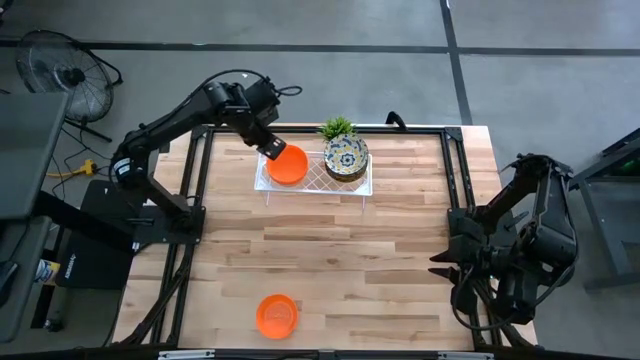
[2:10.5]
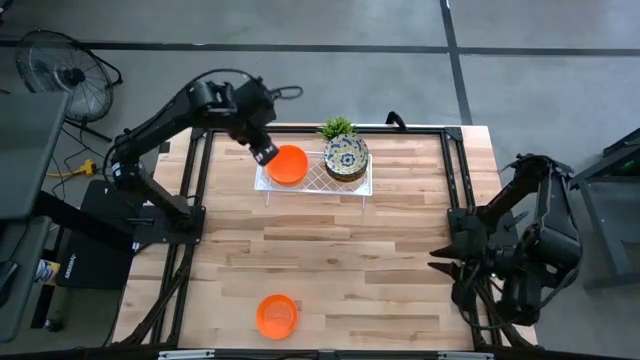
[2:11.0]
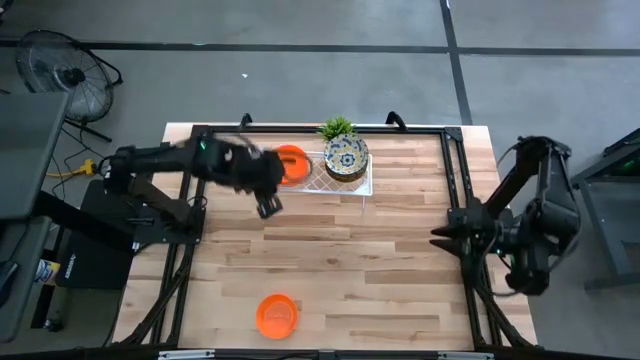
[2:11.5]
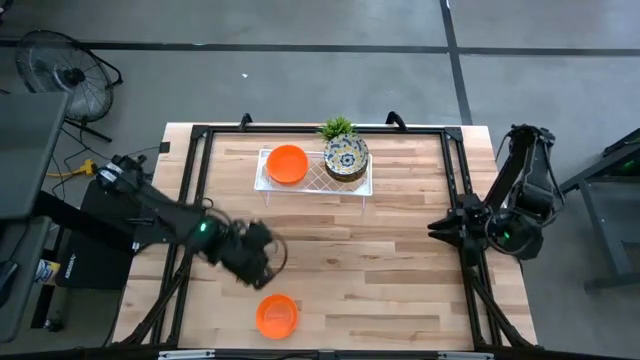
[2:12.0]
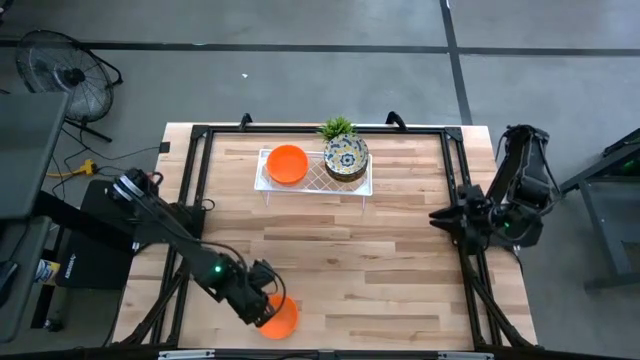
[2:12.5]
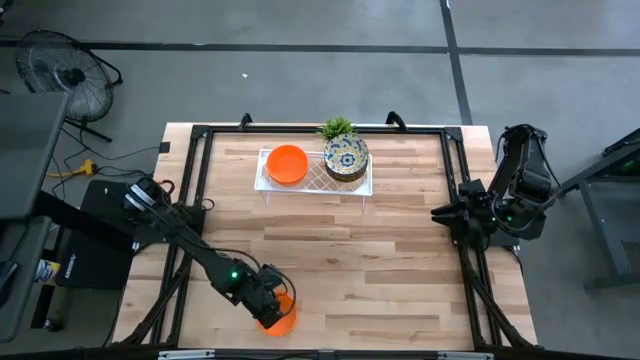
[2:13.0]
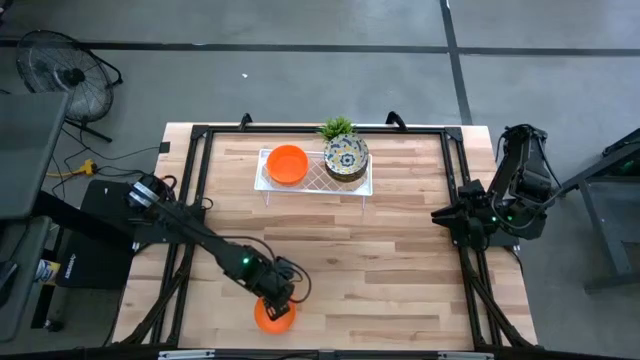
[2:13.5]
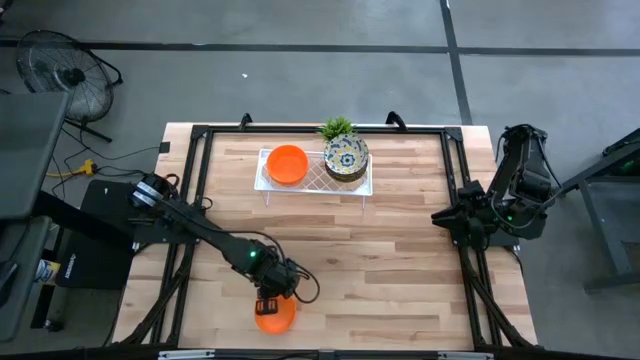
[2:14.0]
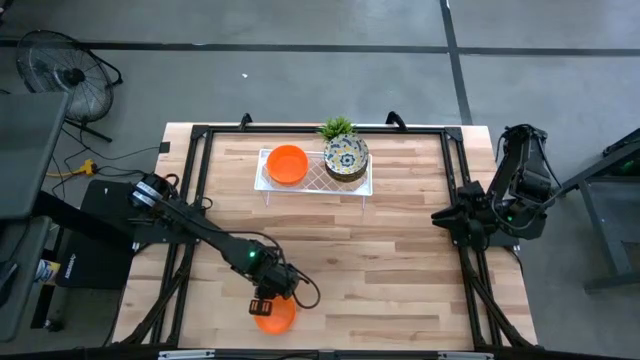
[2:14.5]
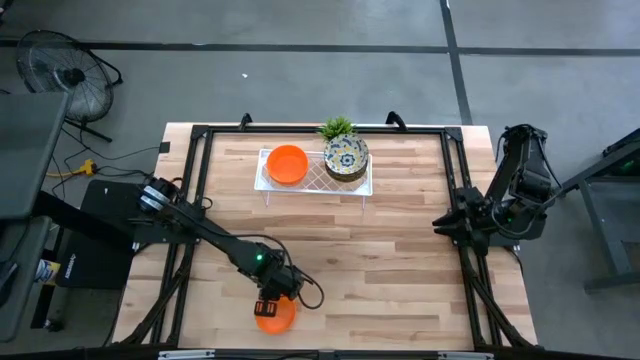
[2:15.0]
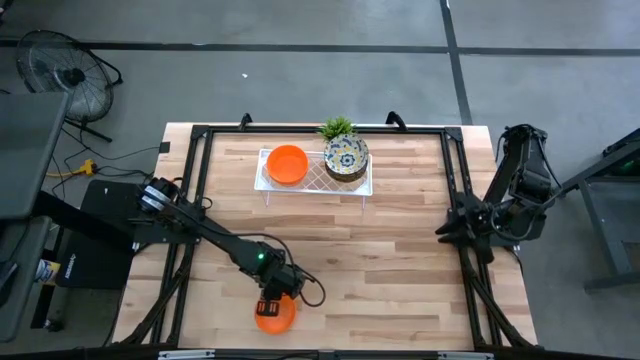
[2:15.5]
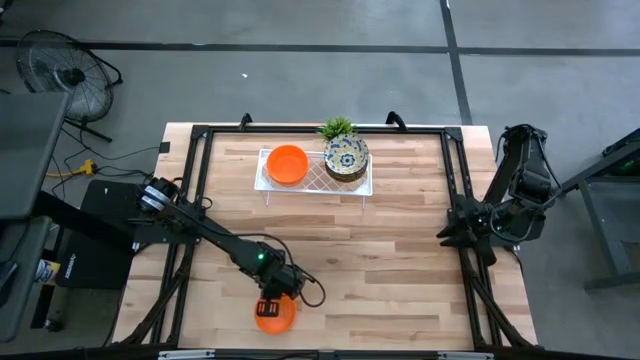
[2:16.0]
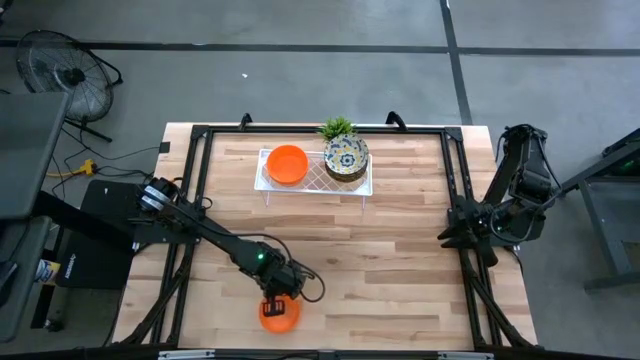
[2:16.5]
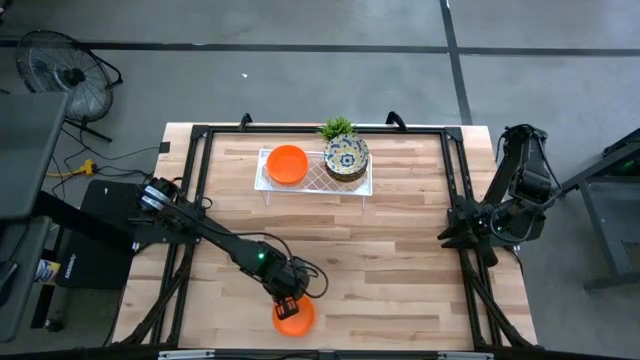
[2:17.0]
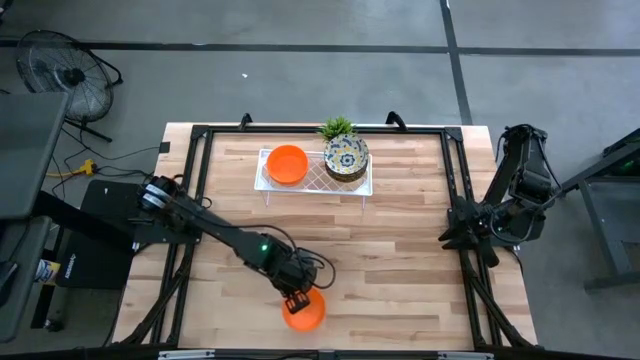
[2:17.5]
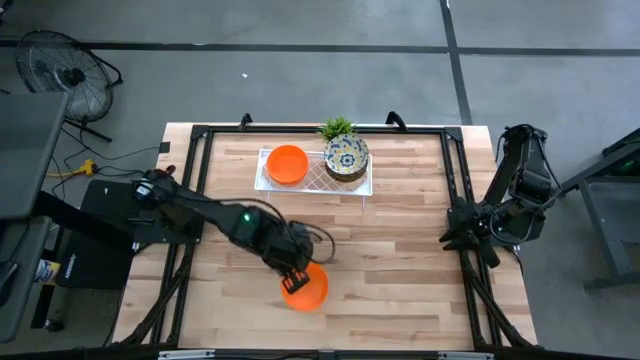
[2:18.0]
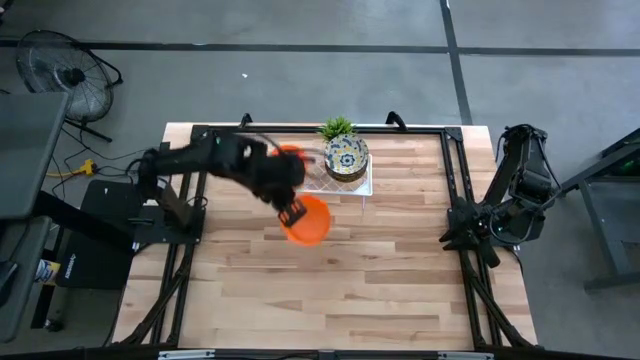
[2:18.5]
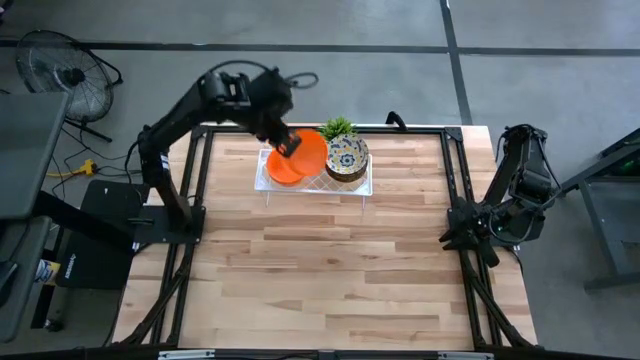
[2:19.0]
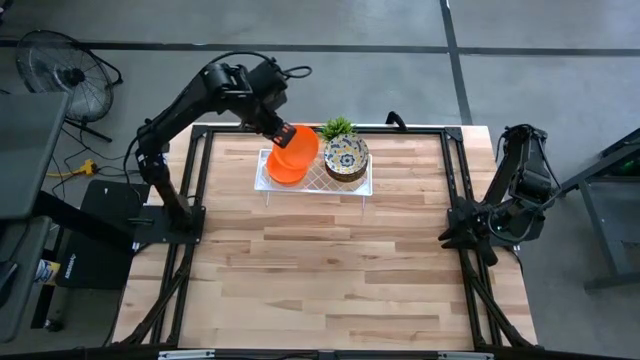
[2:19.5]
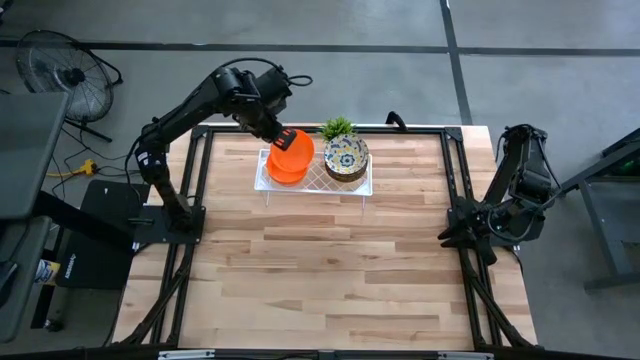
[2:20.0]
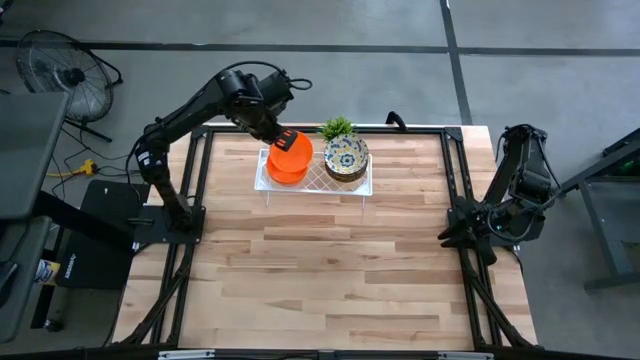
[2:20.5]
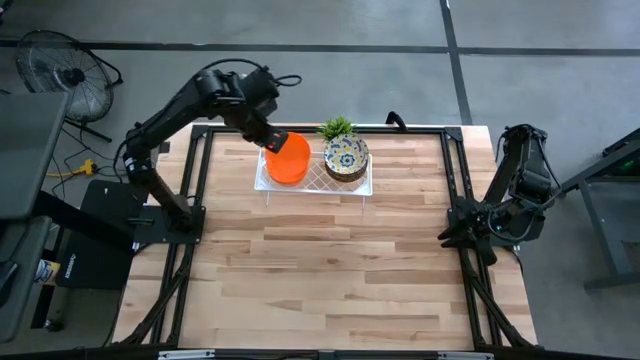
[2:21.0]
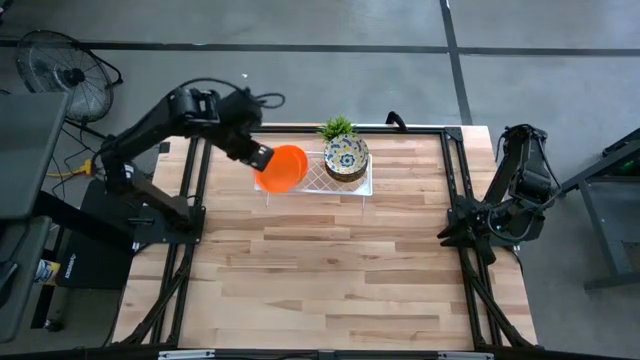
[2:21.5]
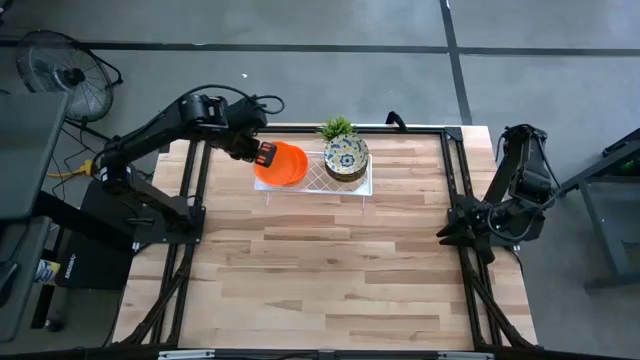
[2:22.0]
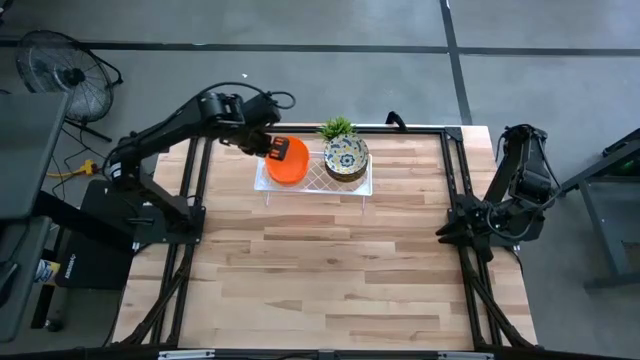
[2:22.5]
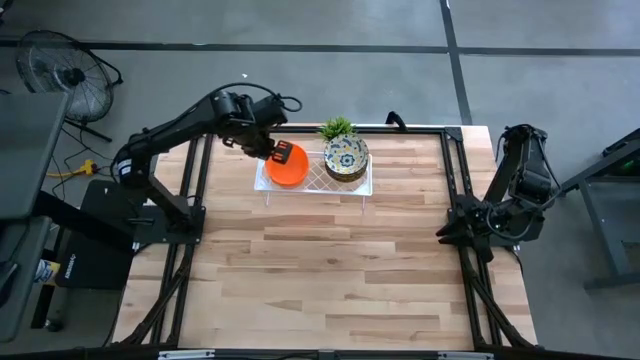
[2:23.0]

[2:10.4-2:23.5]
Task: Pick & Place Mini bowls
Stack the orange bowl on the orange bowl on the shelf

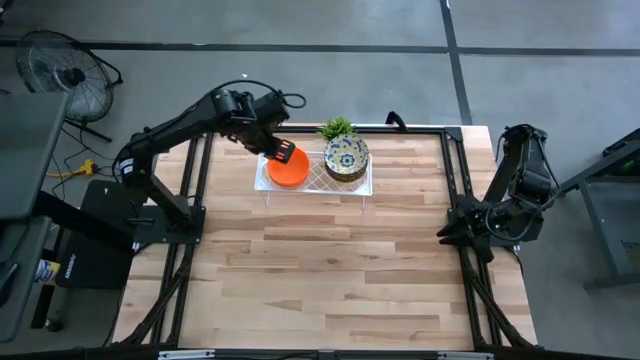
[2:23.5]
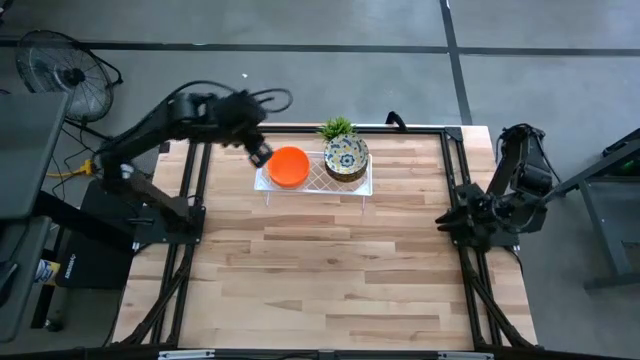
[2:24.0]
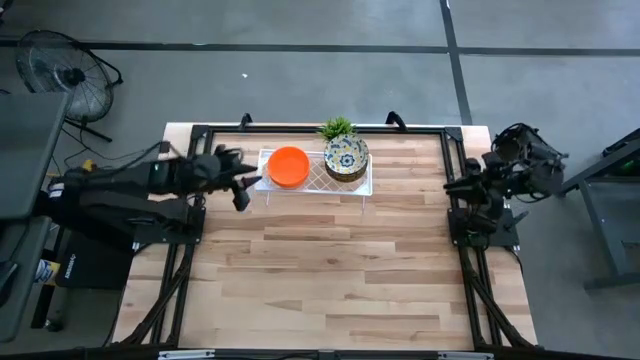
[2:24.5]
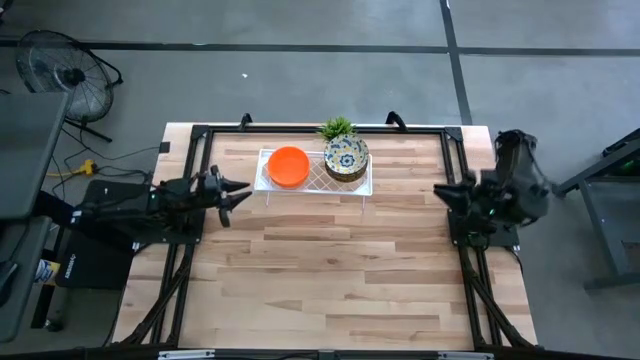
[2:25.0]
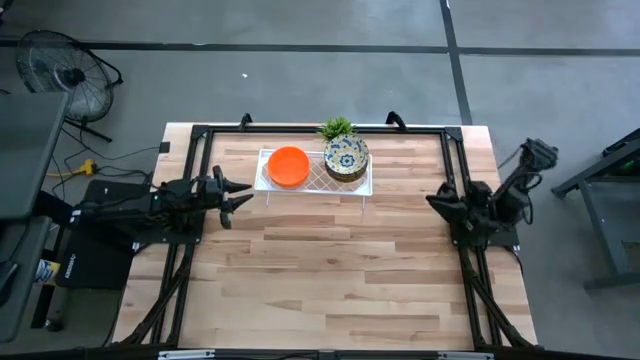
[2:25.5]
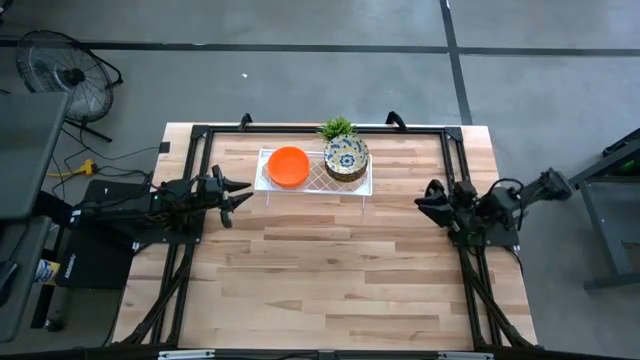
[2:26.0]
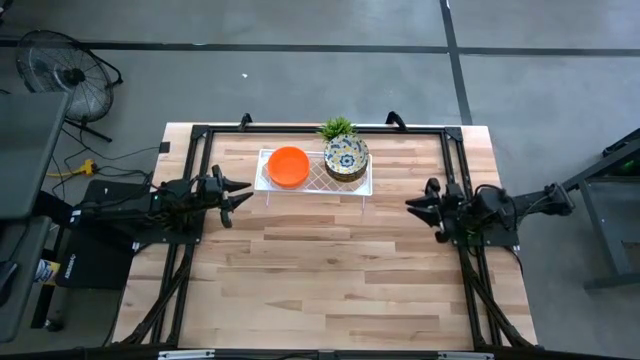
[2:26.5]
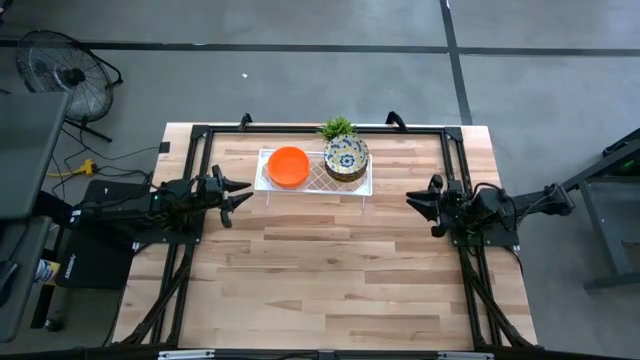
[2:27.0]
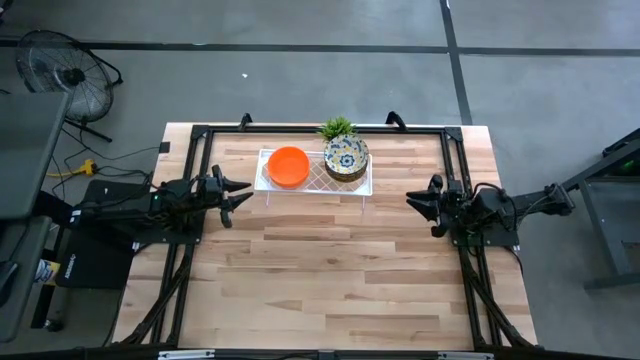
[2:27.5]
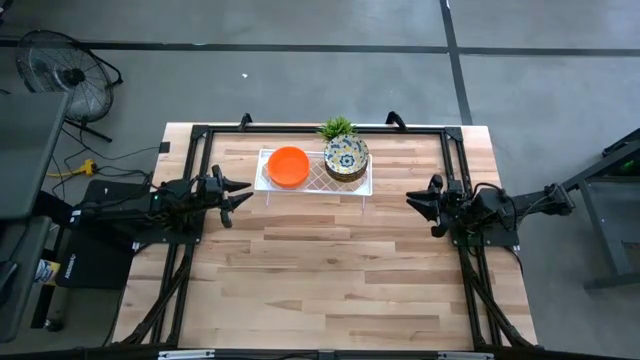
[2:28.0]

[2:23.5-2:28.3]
Return to Home Position

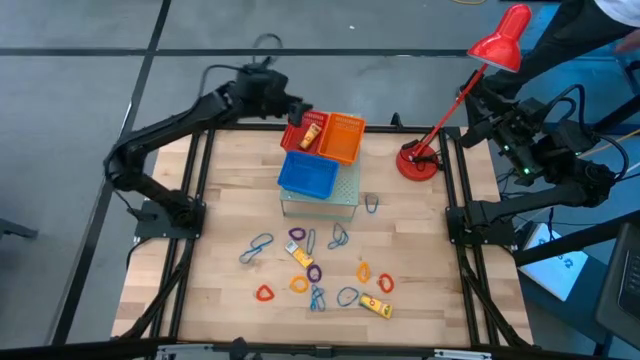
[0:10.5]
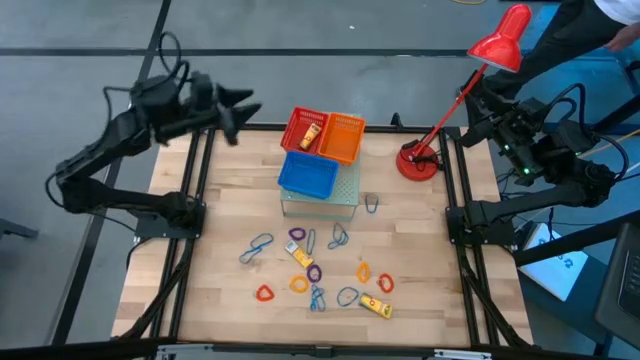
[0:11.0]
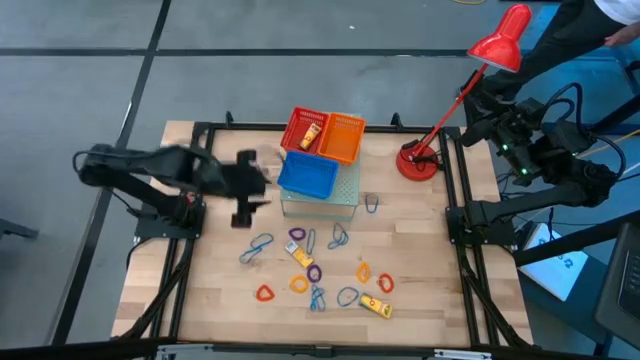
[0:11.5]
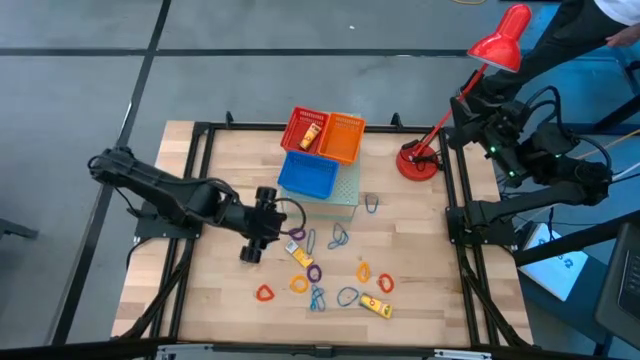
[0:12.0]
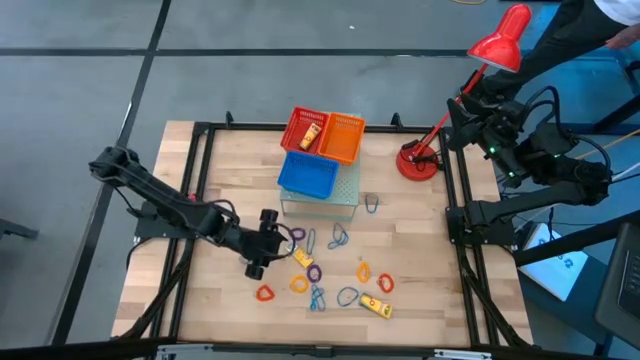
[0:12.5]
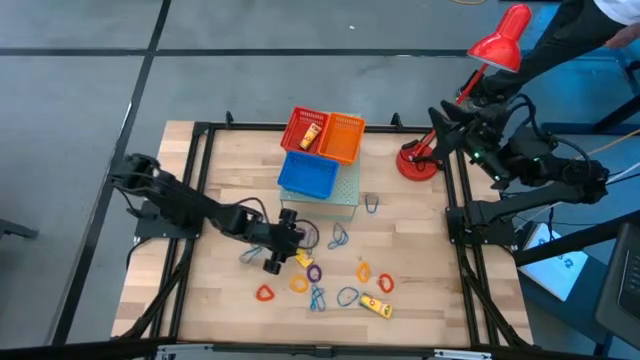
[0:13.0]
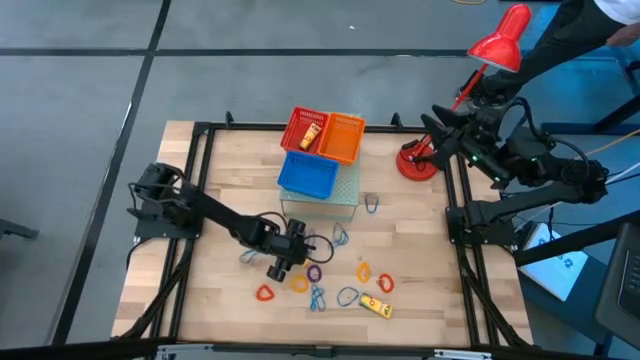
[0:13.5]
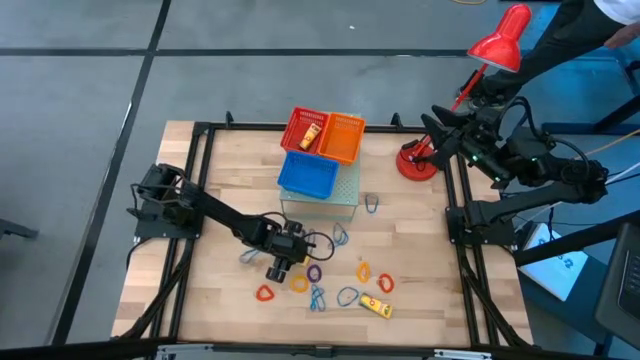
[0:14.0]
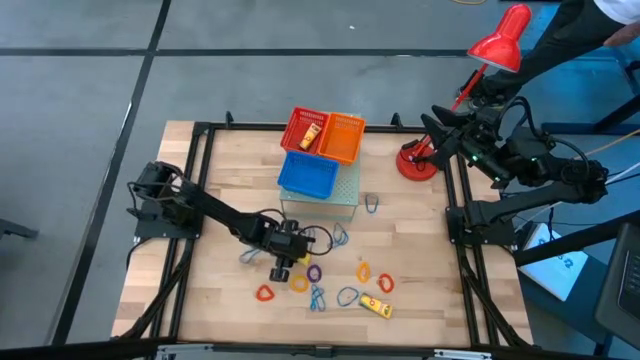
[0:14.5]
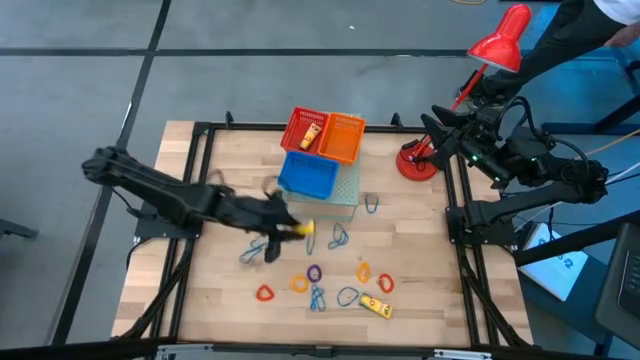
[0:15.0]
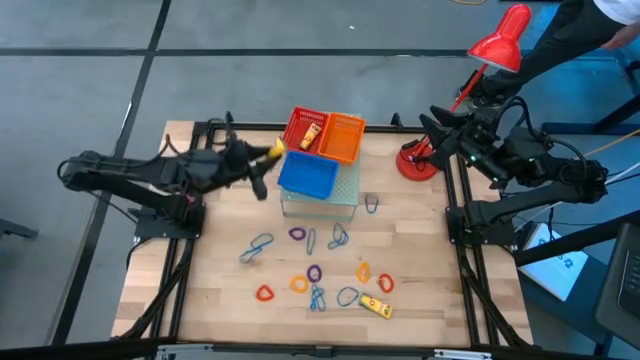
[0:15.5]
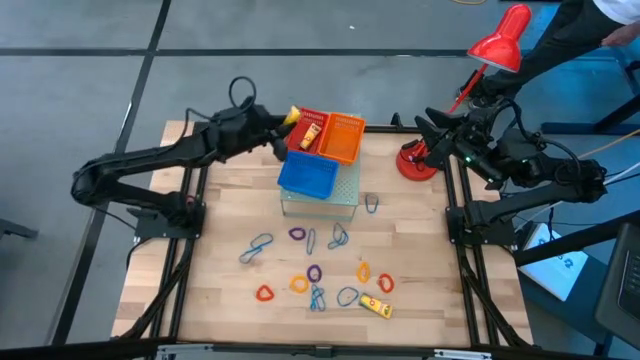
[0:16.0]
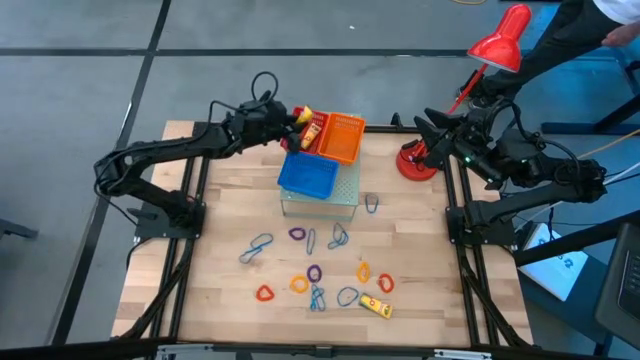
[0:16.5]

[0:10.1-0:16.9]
Task: Pick & Place Office Desk Supplies
Put the crayon box into the red basket on the shelf
